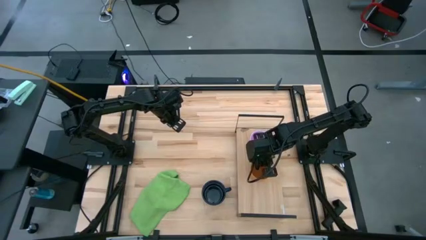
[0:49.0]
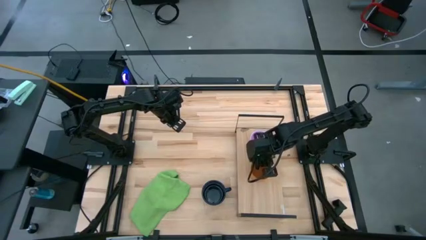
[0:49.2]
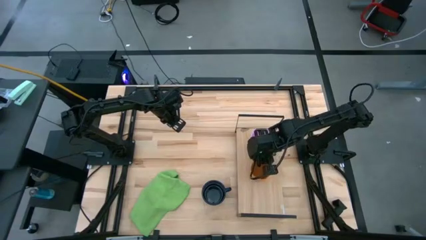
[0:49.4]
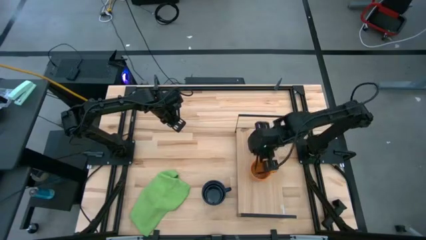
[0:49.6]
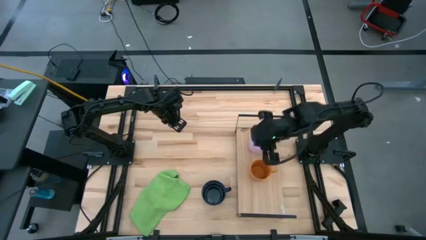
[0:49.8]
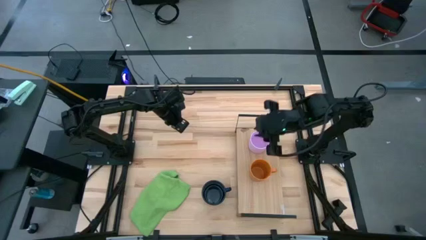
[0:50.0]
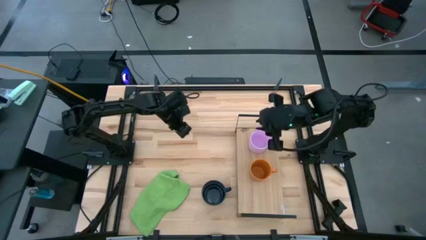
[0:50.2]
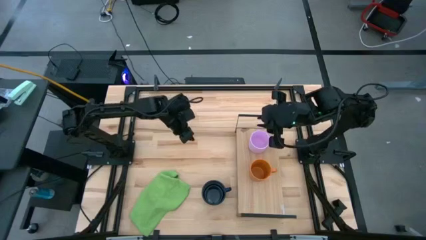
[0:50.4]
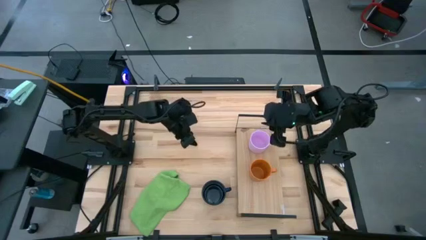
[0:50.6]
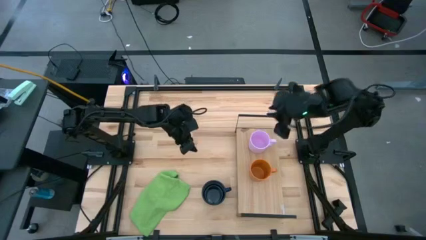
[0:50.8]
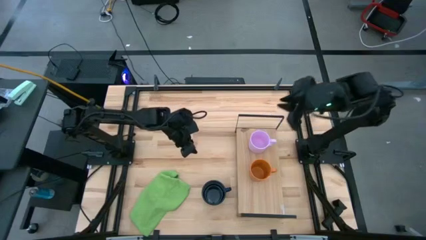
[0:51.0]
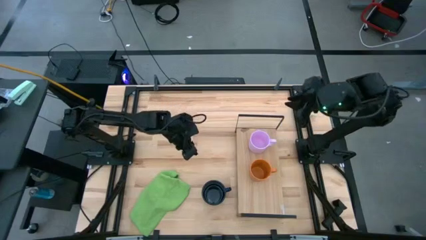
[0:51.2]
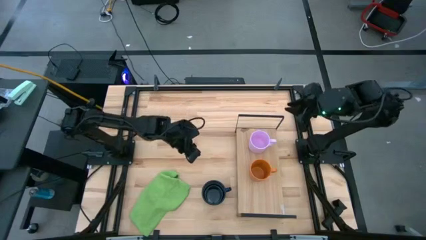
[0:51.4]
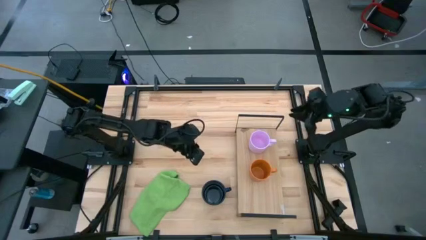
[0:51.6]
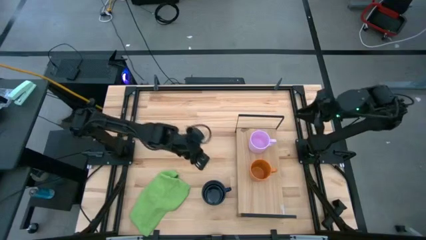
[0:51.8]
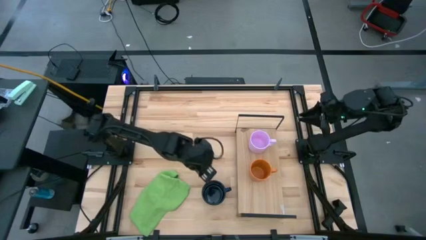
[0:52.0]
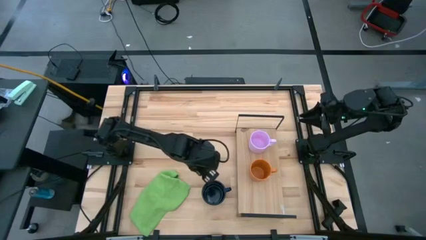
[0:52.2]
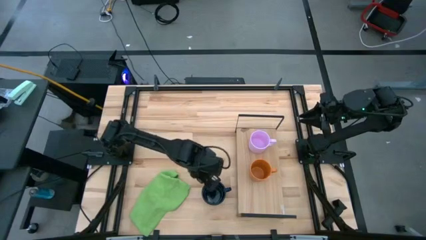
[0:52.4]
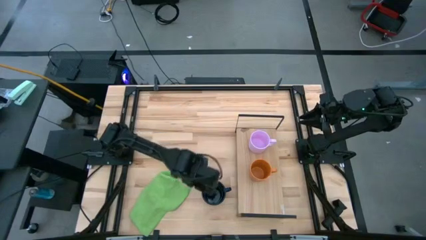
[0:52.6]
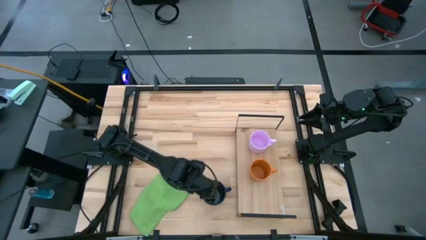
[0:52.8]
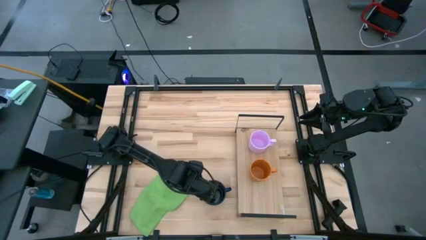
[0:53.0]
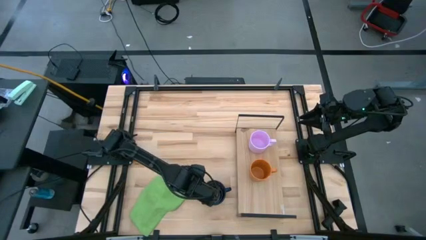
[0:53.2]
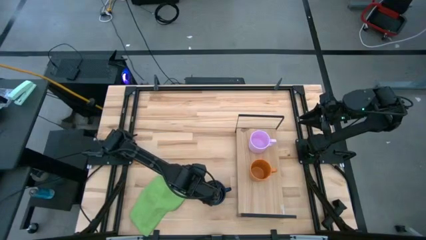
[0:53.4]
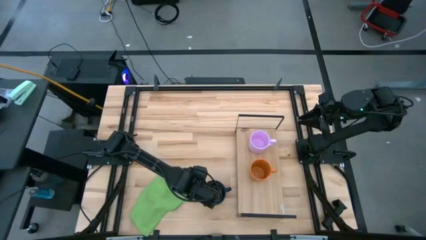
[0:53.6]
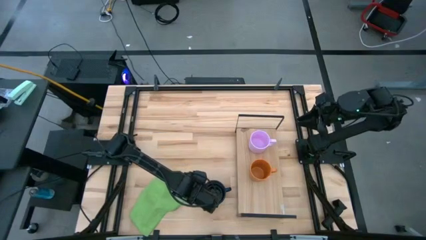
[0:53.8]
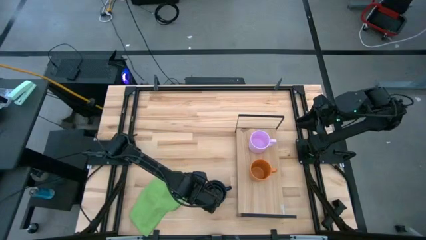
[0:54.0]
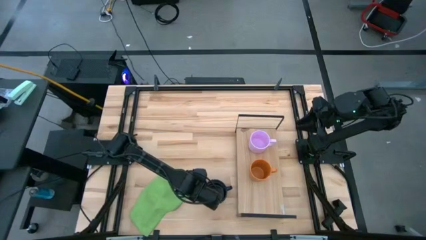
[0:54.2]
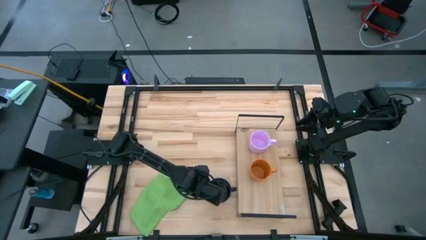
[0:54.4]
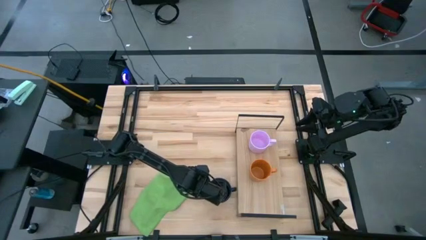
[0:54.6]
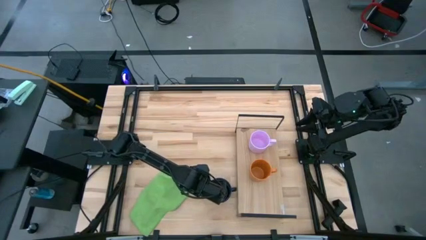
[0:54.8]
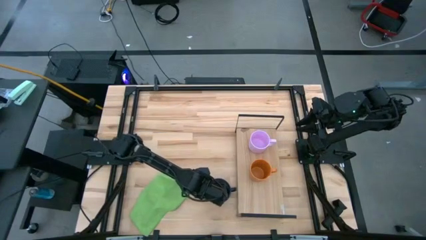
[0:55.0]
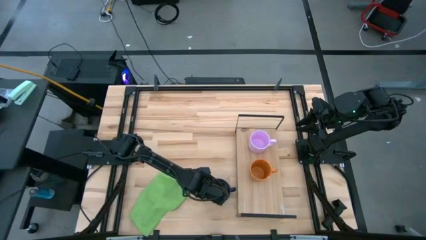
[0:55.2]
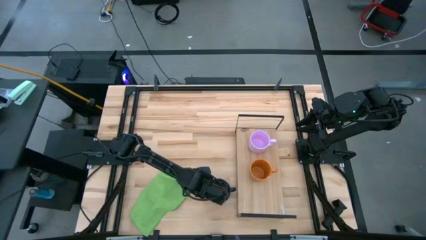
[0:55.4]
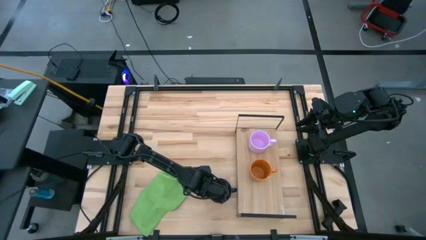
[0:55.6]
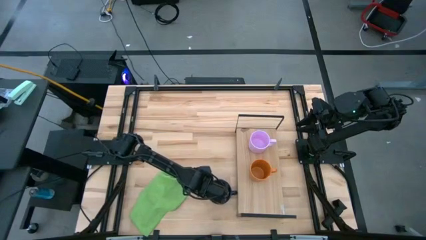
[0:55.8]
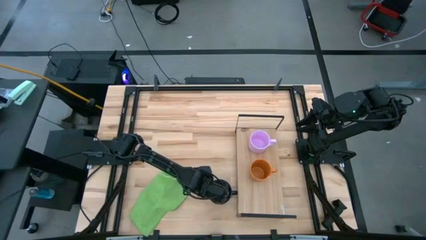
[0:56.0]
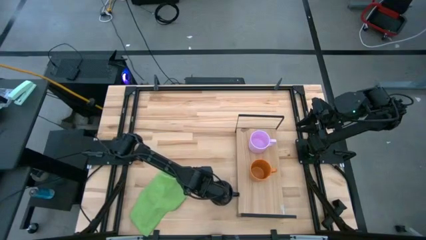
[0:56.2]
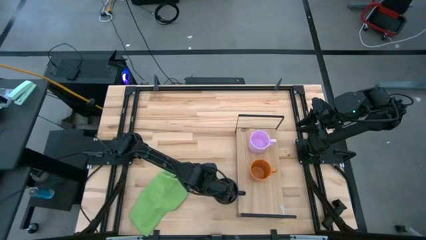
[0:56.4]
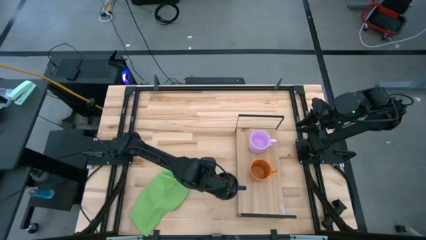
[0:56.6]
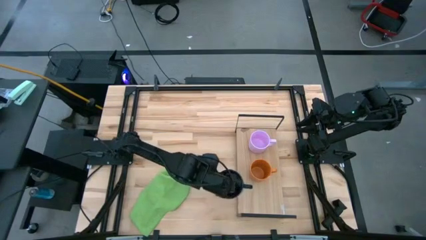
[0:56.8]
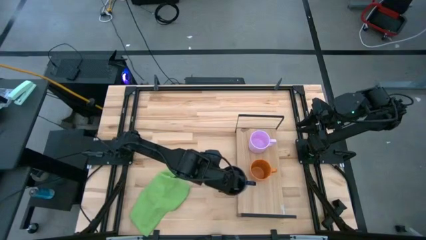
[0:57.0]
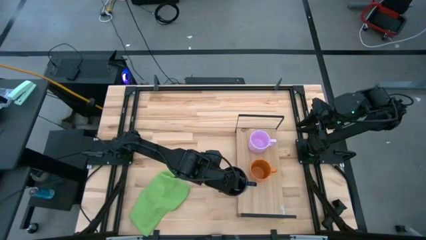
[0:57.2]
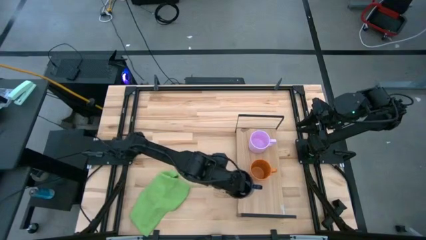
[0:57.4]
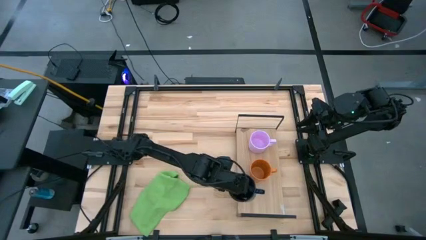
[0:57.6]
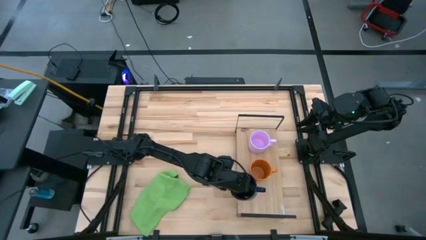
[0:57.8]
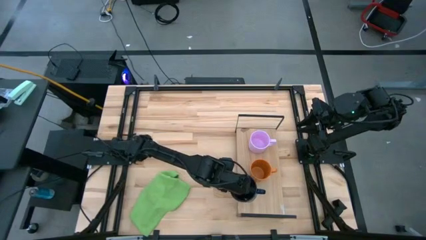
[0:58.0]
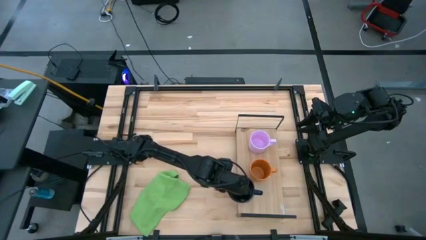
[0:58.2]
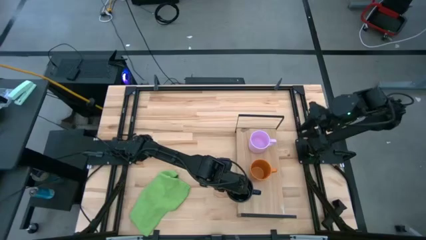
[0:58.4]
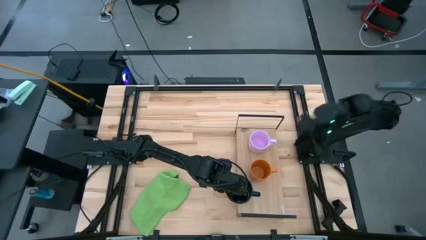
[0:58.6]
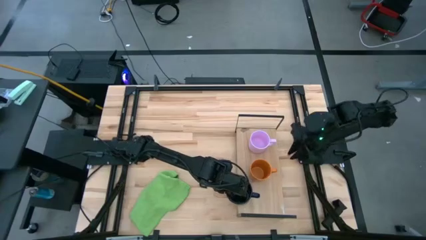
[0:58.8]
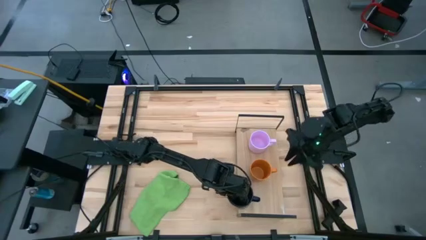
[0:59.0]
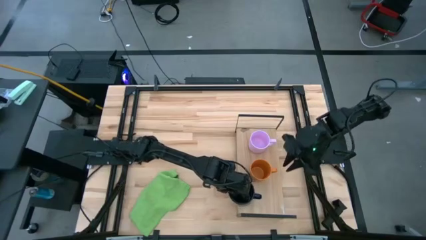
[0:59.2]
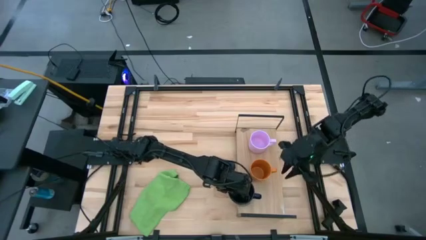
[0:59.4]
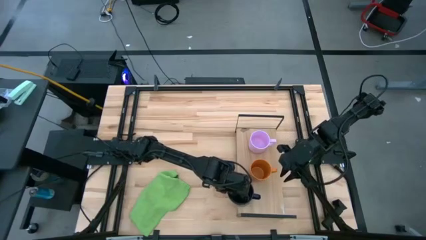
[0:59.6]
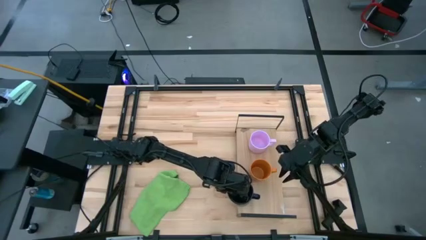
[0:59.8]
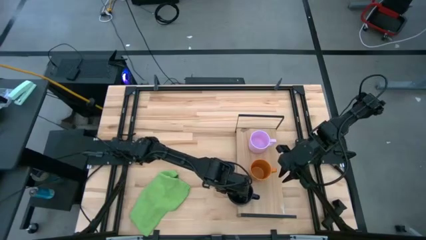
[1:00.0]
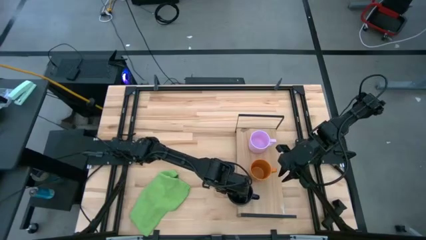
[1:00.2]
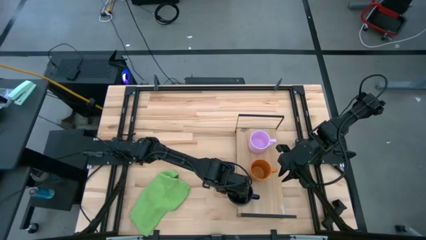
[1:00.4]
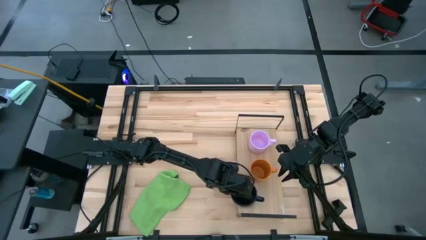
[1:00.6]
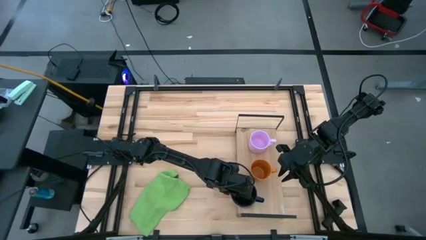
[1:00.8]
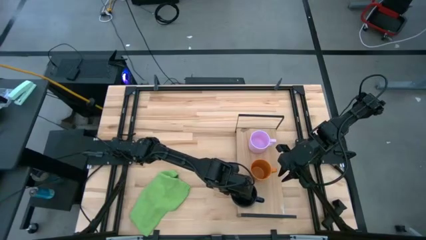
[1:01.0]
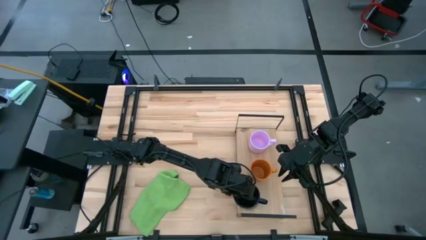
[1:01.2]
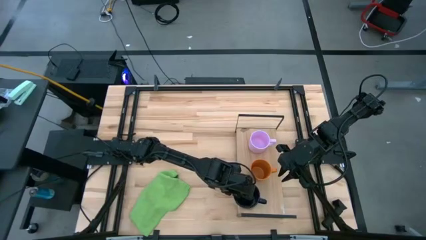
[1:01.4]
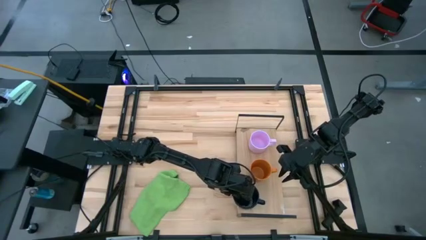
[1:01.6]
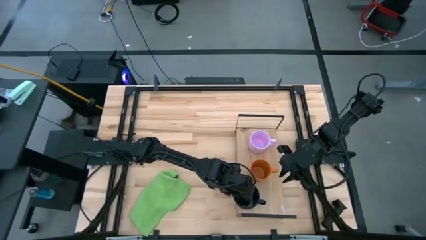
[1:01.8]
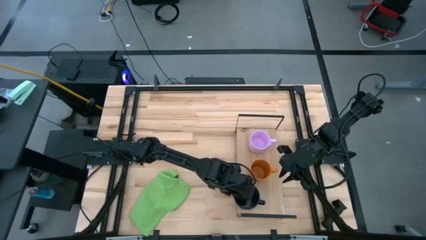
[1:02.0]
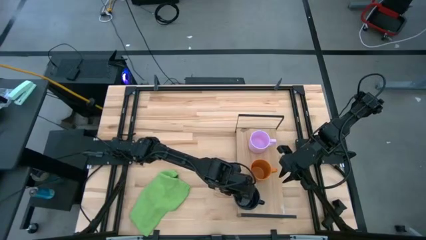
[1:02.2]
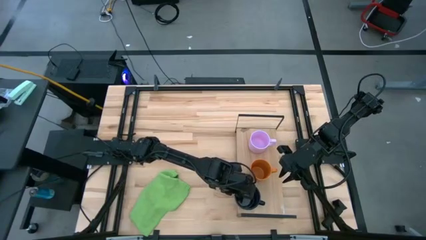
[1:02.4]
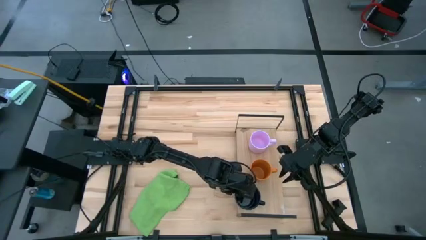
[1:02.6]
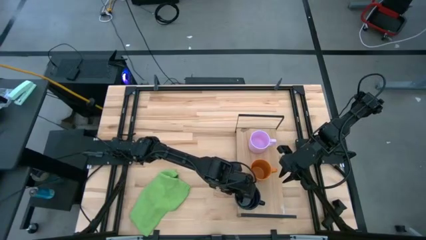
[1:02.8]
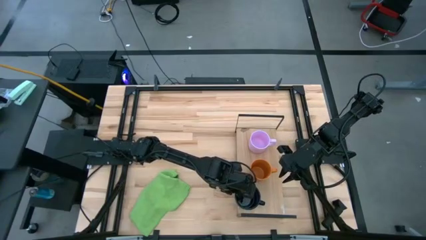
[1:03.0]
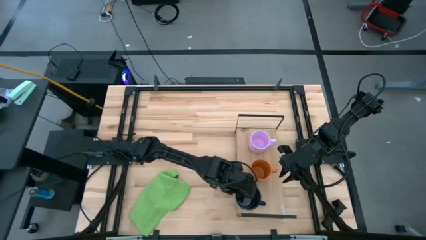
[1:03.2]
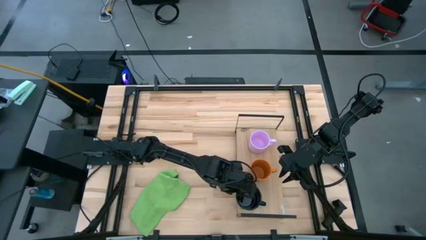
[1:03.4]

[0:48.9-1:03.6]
Task: Stack small to large cups/mugs on shelf
Put the dark blue mug on the shelf
